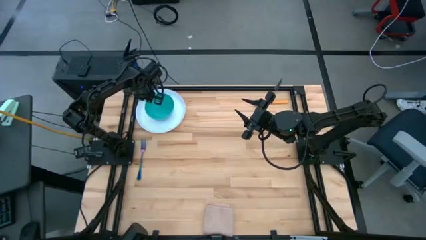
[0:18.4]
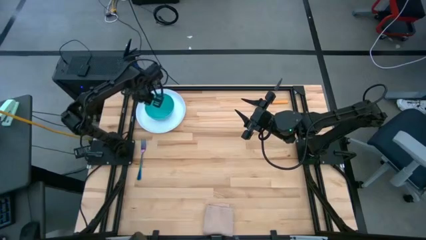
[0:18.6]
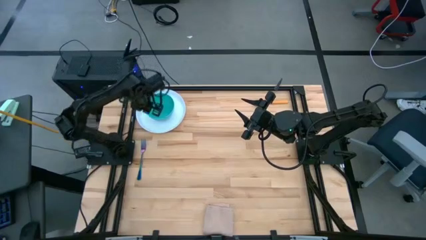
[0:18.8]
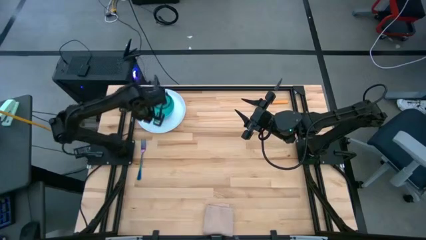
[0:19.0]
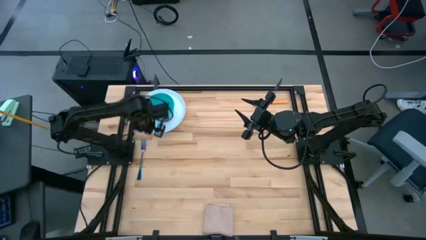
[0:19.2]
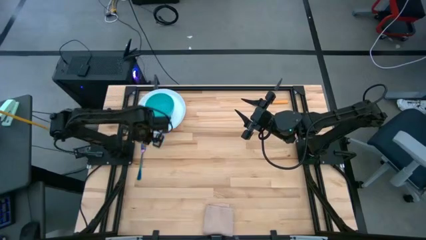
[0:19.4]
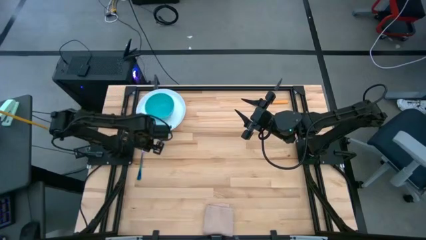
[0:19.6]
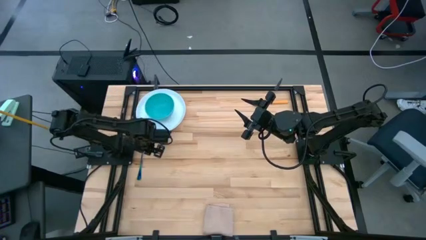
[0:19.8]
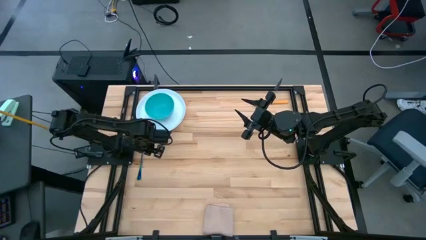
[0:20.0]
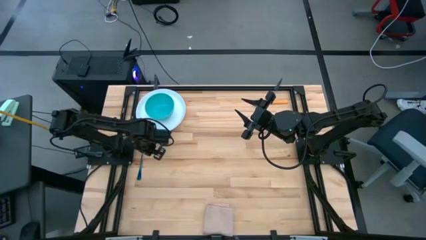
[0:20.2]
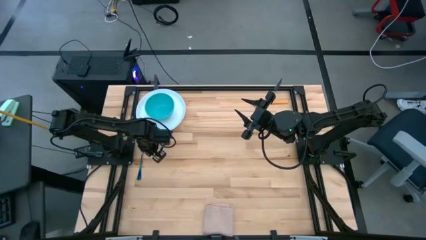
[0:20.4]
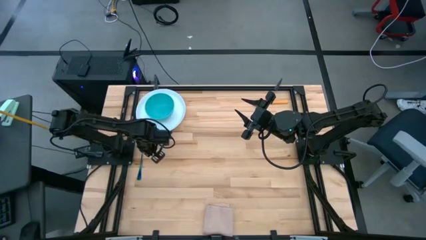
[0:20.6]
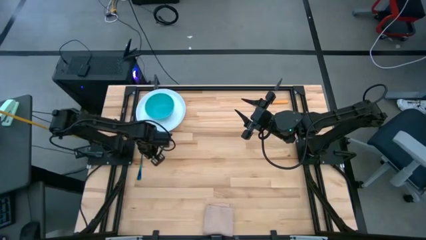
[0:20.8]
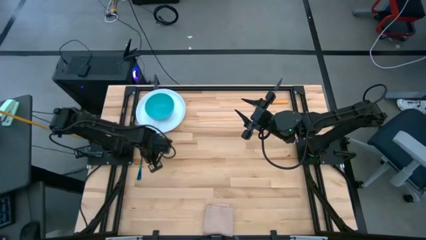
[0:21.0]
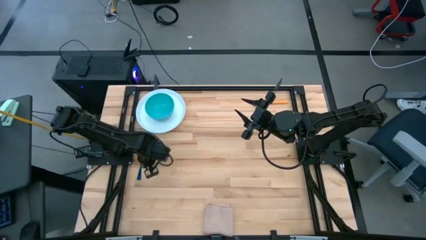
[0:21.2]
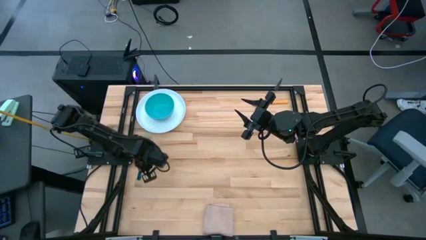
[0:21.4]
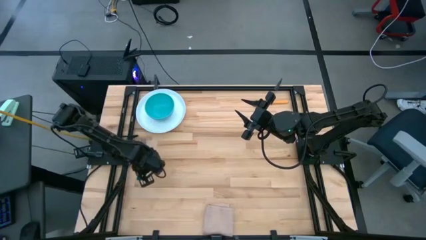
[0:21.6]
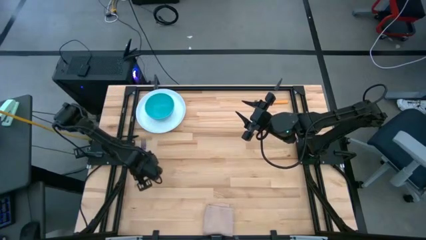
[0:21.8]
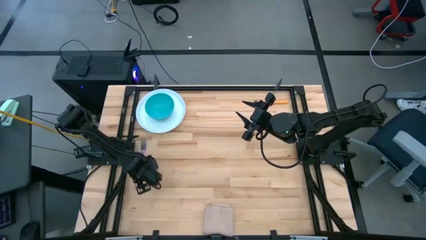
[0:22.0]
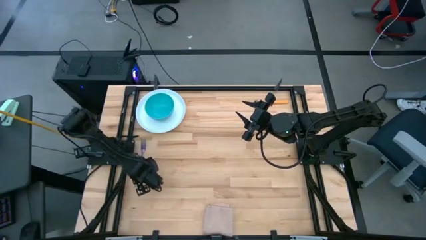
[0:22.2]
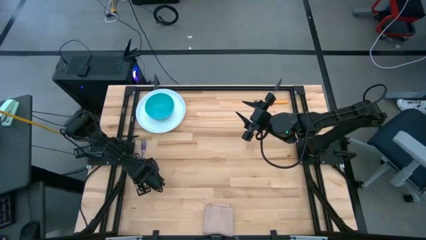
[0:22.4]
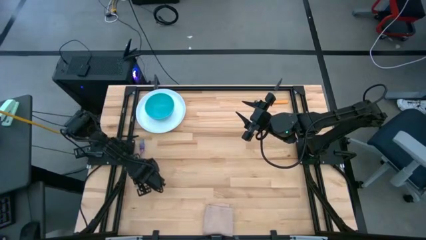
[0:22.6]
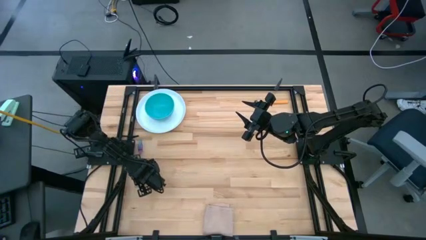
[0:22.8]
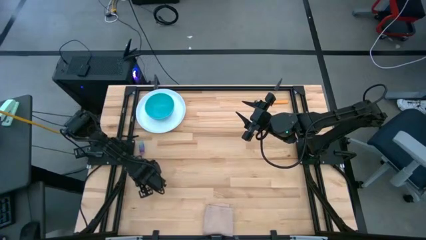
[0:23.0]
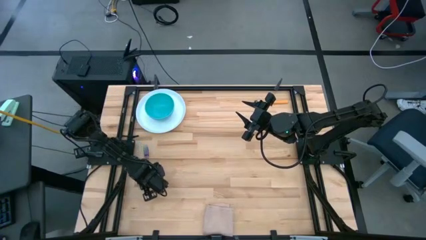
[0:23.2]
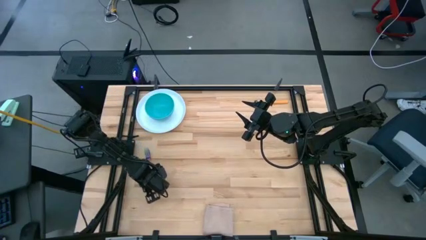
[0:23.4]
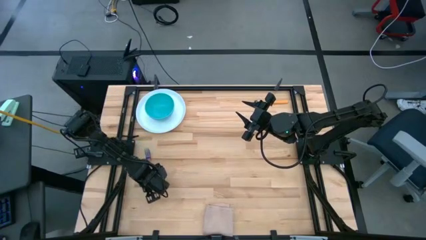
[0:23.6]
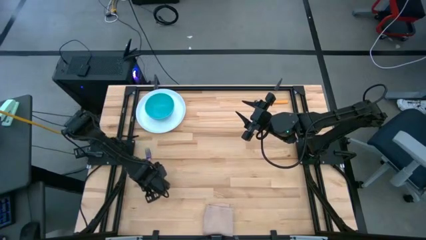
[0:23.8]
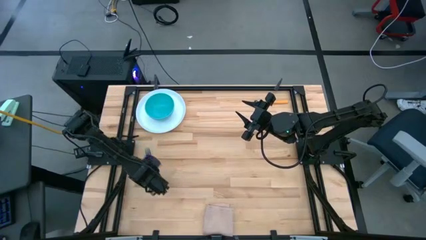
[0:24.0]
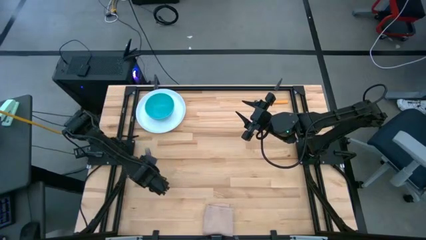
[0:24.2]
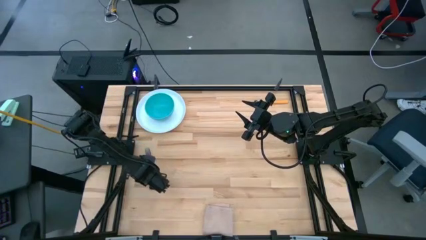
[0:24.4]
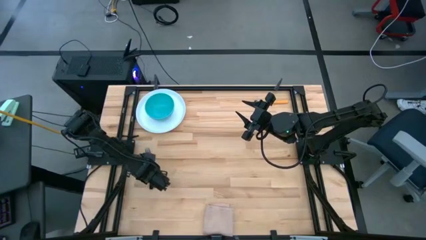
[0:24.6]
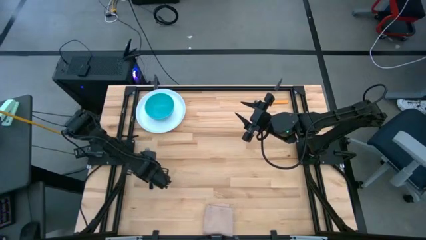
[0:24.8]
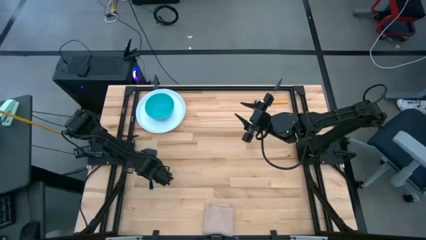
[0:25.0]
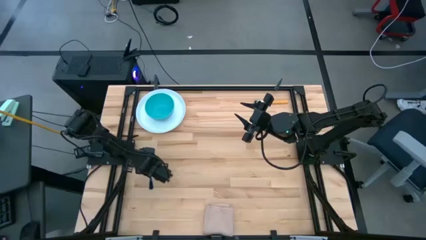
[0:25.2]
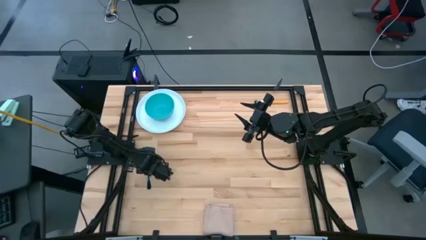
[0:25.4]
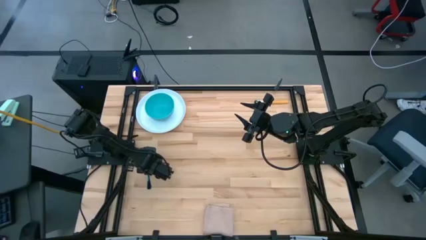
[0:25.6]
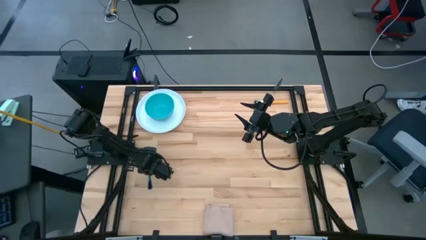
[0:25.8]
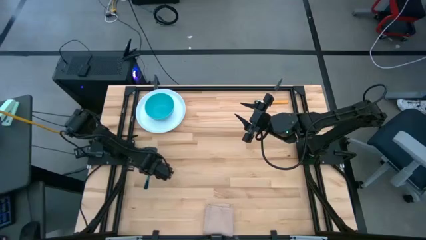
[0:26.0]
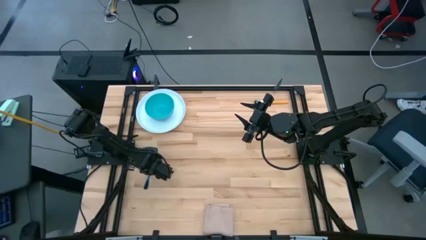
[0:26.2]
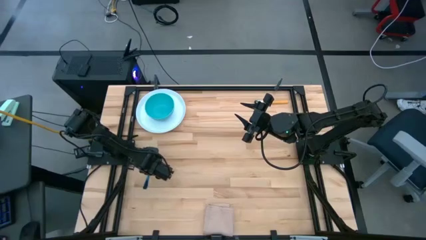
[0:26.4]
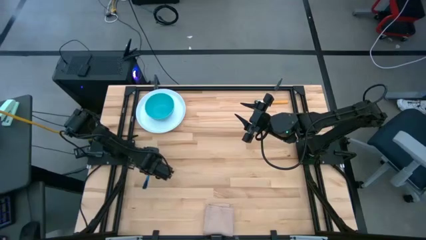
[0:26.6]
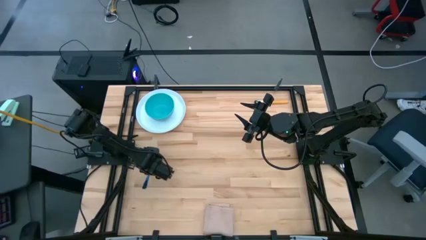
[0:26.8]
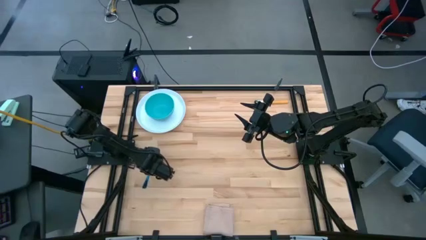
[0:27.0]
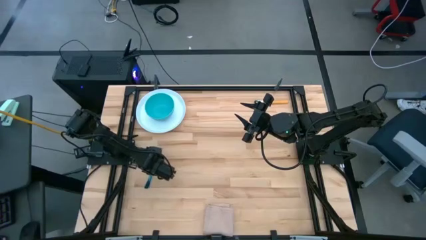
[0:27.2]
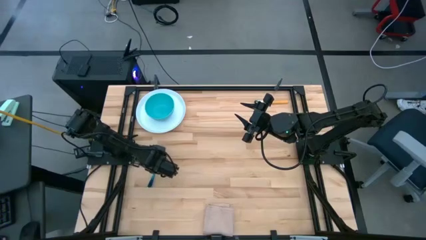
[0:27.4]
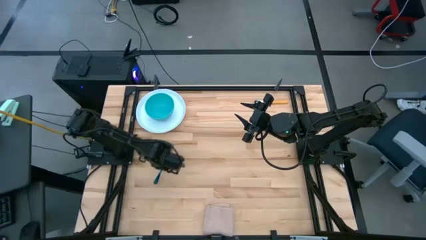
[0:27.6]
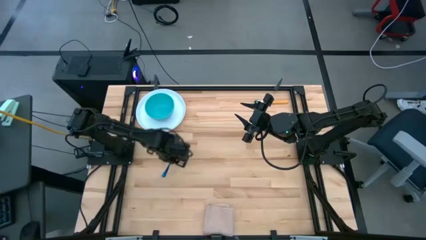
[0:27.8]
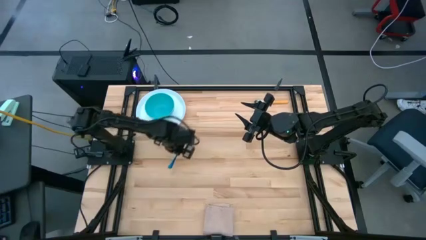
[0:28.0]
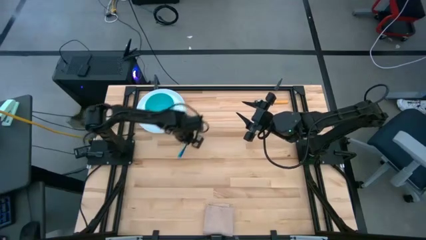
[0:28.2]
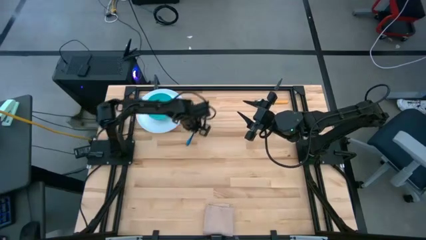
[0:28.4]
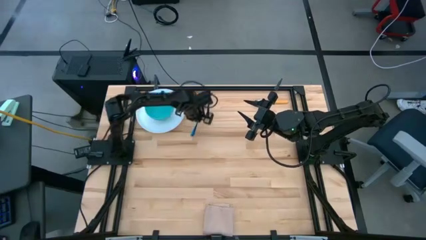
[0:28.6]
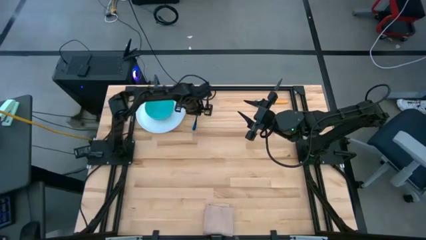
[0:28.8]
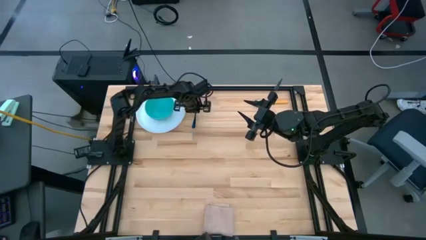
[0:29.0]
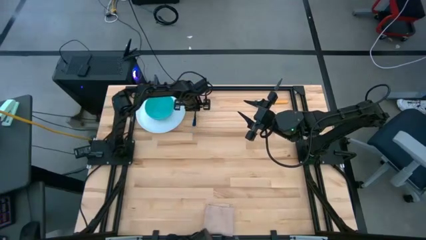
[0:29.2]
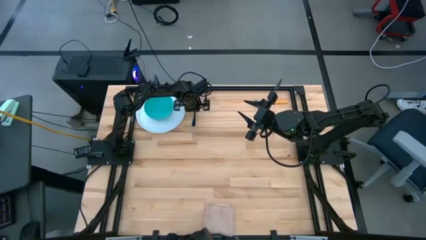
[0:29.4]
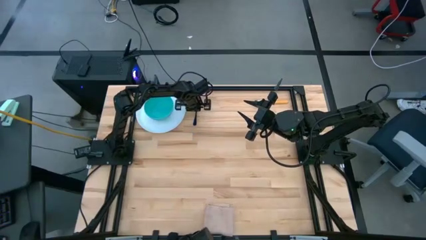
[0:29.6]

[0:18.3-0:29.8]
Task: Set table place
Put the purple fork on the right side of the white plate

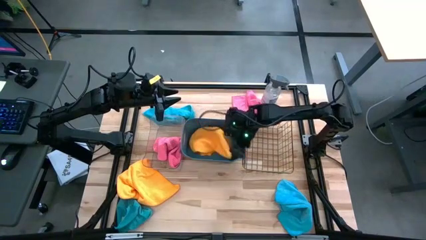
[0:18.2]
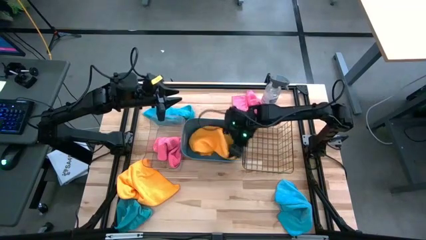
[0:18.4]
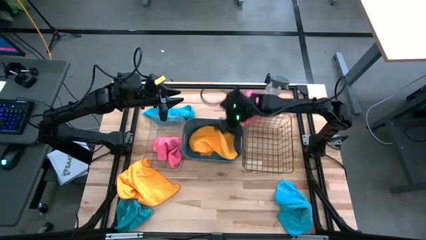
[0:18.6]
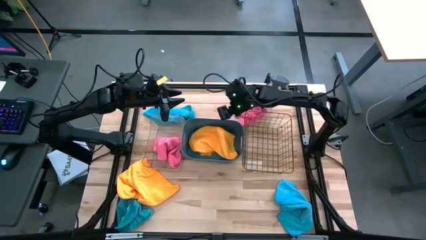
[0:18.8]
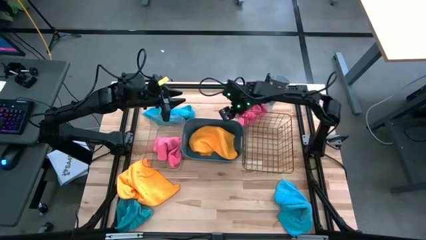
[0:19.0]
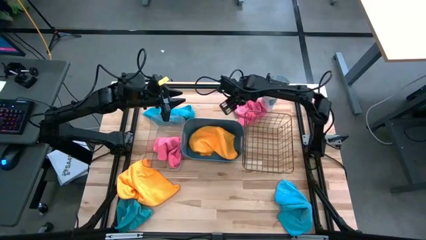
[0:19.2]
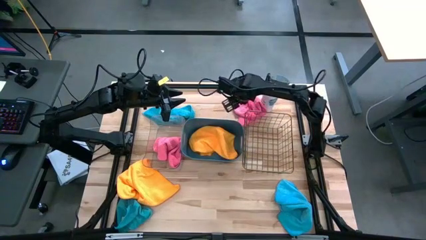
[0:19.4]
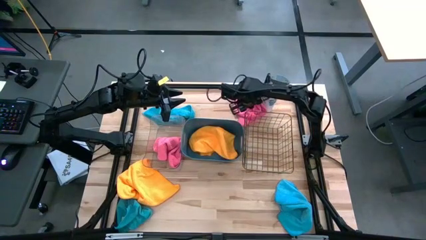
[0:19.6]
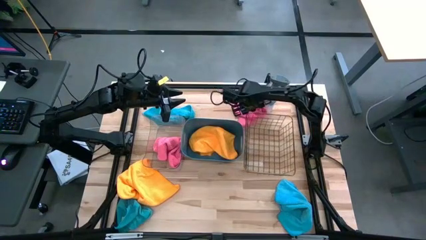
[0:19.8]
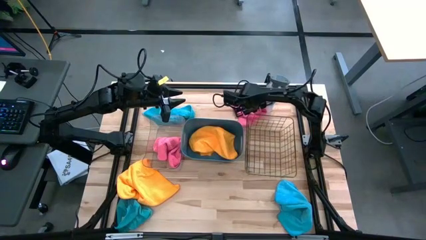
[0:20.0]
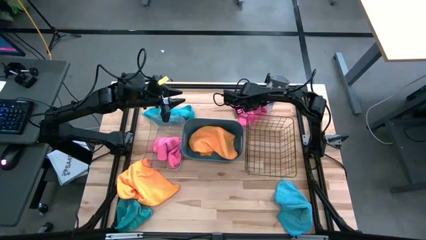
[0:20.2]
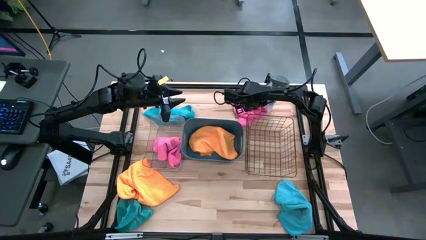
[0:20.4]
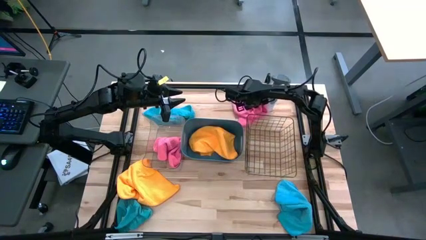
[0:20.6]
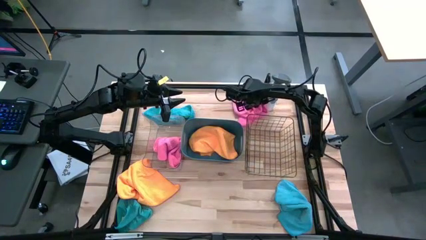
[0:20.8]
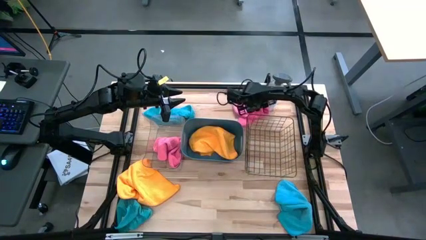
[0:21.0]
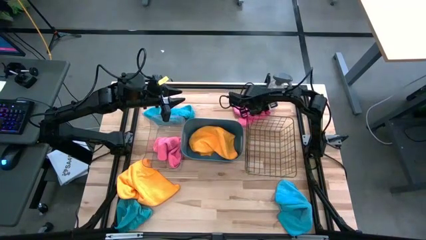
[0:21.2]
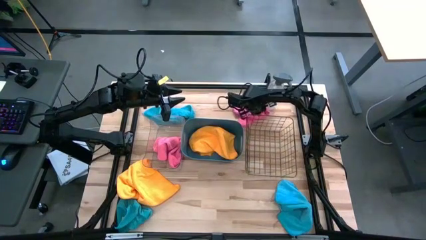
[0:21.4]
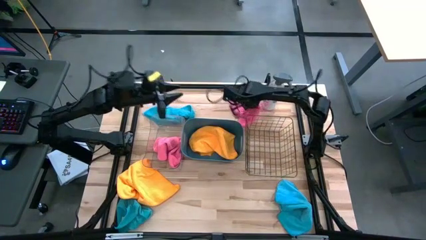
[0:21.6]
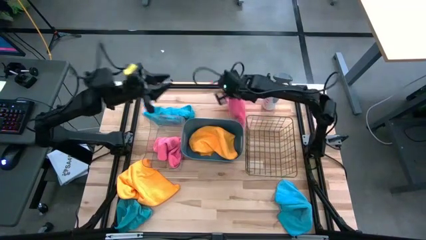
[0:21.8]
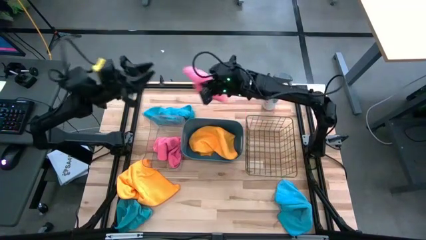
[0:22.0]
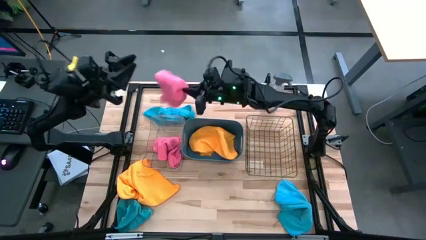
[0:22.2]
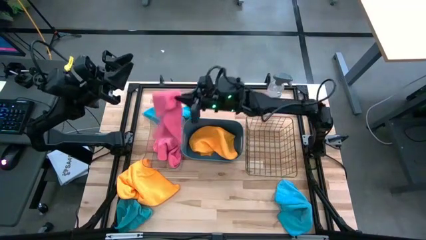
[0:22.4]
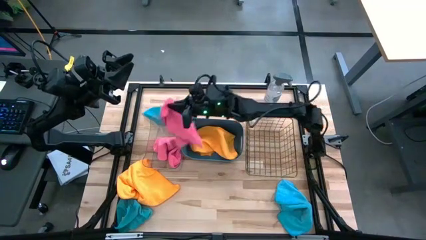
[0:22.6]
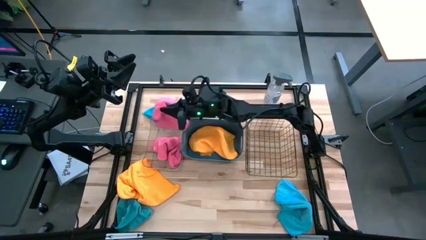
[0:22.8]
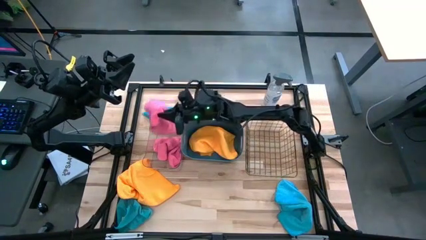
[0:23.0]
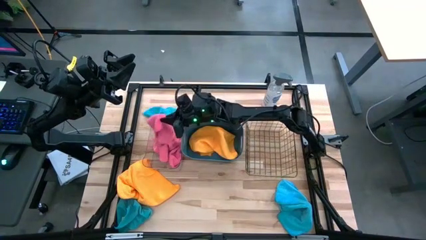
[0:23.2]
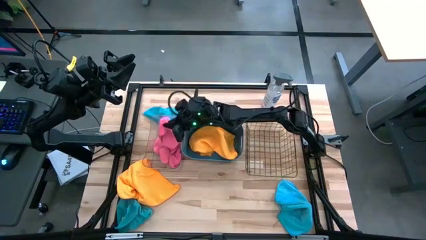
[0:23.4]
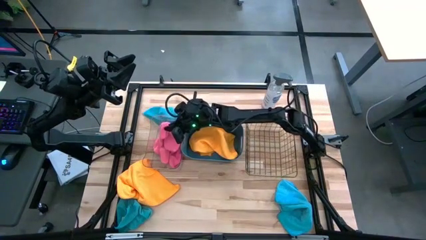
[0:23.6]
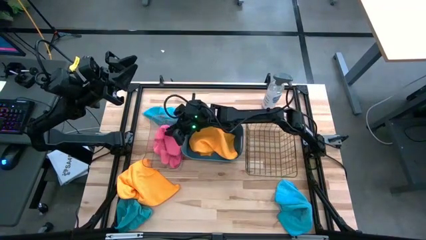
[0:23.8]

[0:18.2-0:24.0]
Task: Sort microfiber towel by color & place in baskets
Put the pink microfiber cloth into the transparent bin
